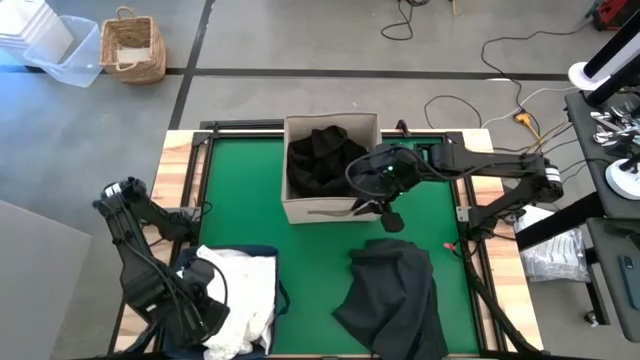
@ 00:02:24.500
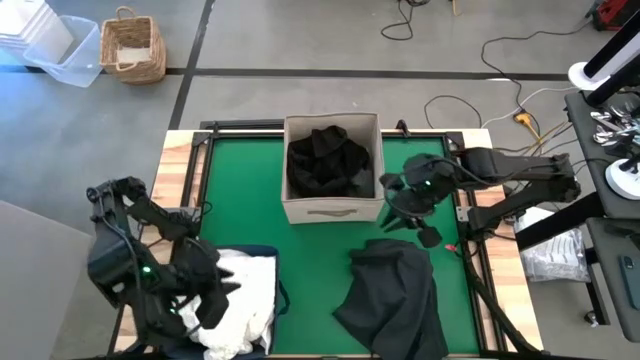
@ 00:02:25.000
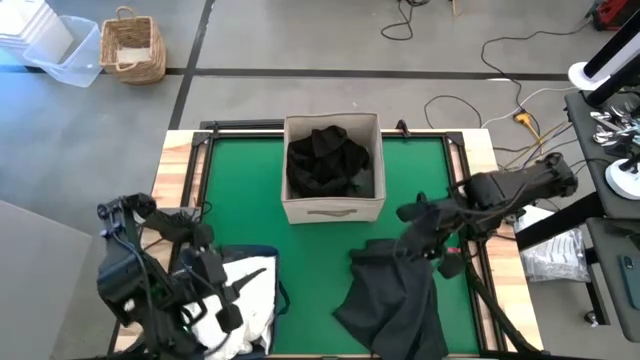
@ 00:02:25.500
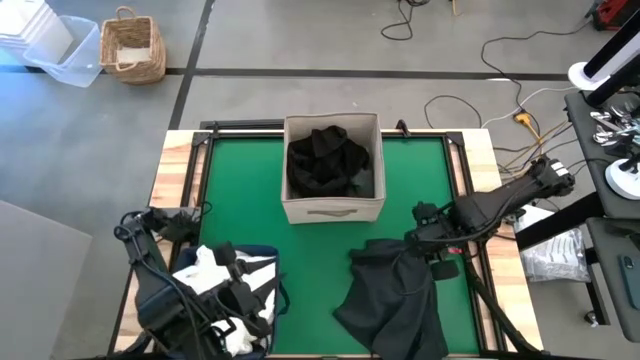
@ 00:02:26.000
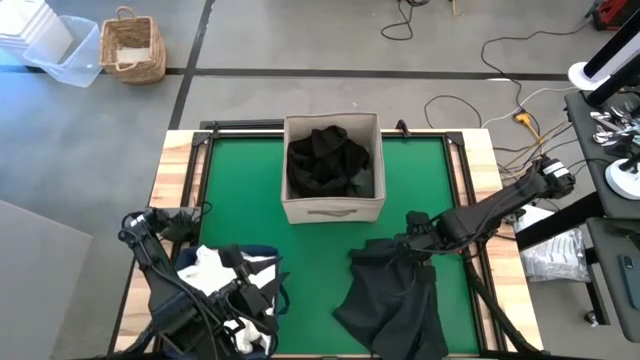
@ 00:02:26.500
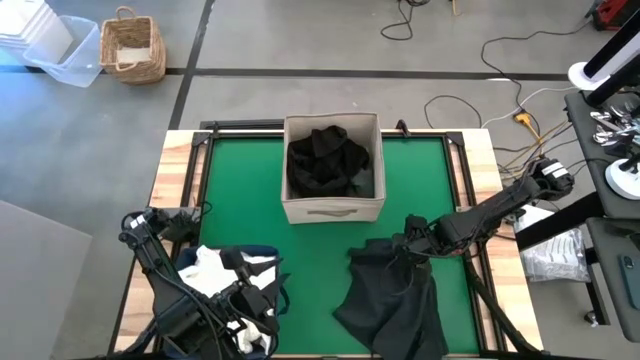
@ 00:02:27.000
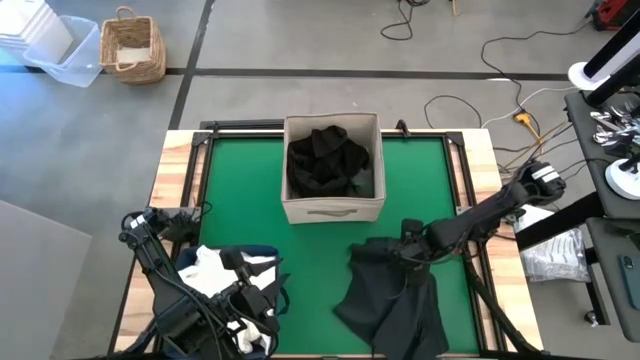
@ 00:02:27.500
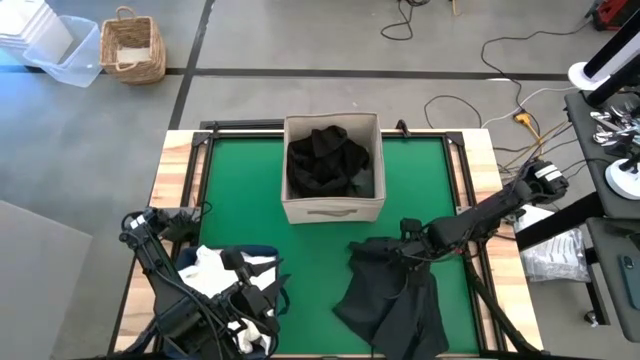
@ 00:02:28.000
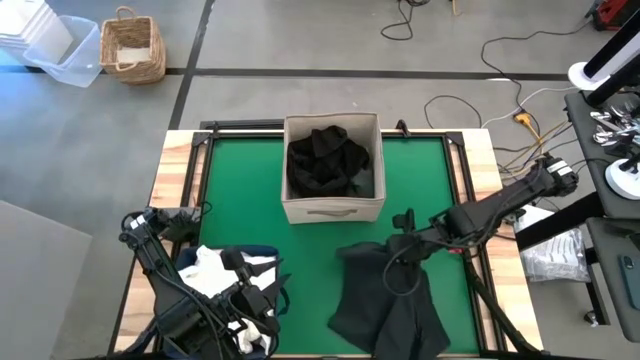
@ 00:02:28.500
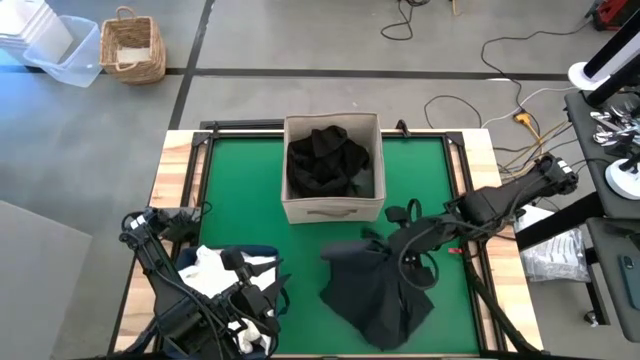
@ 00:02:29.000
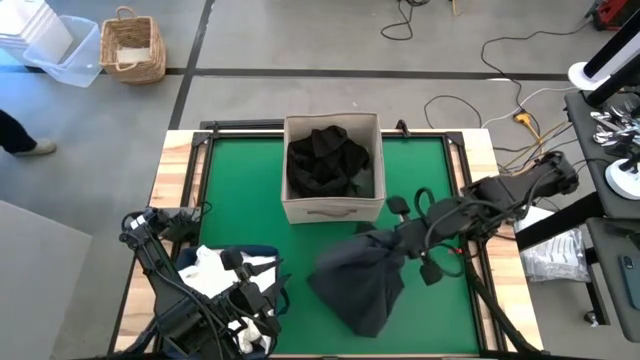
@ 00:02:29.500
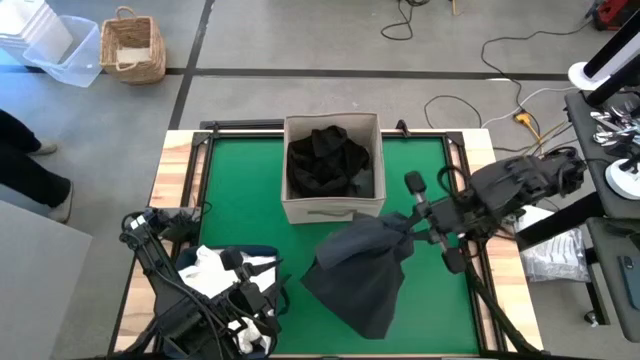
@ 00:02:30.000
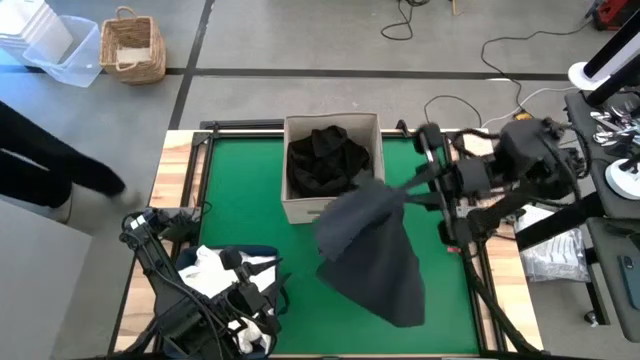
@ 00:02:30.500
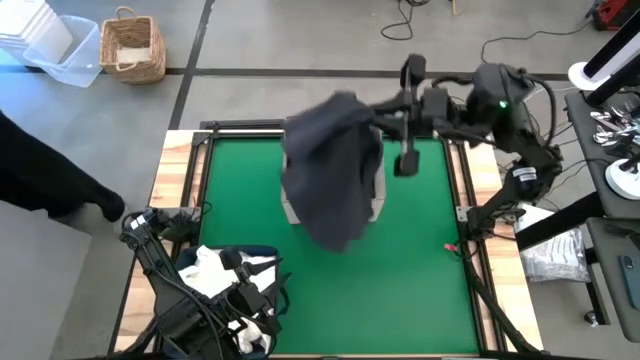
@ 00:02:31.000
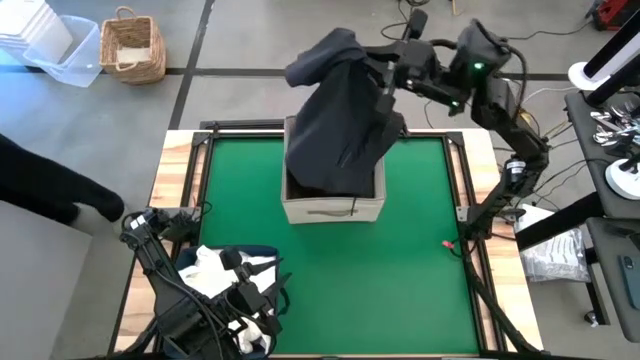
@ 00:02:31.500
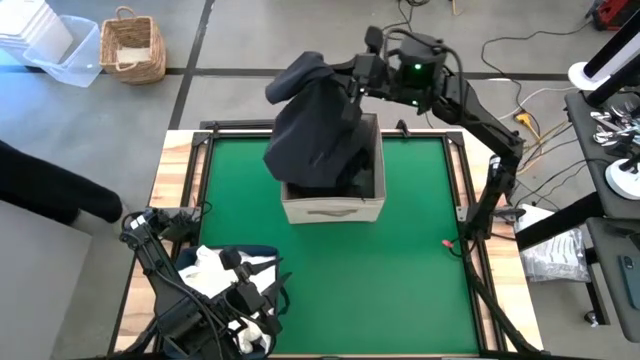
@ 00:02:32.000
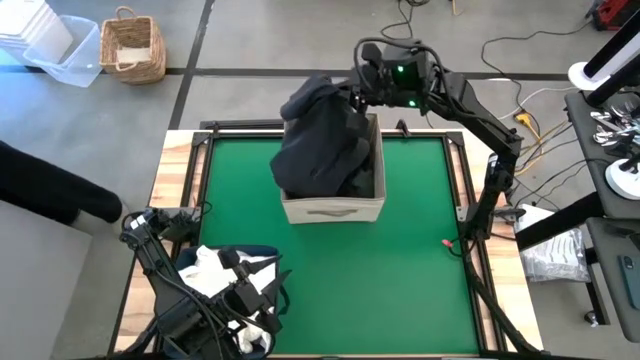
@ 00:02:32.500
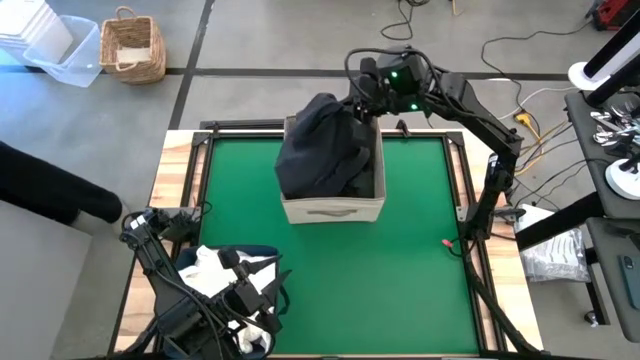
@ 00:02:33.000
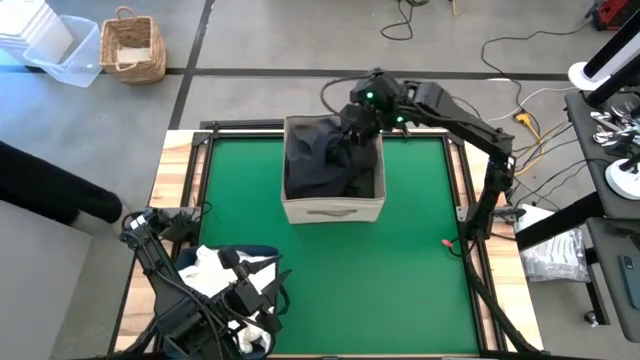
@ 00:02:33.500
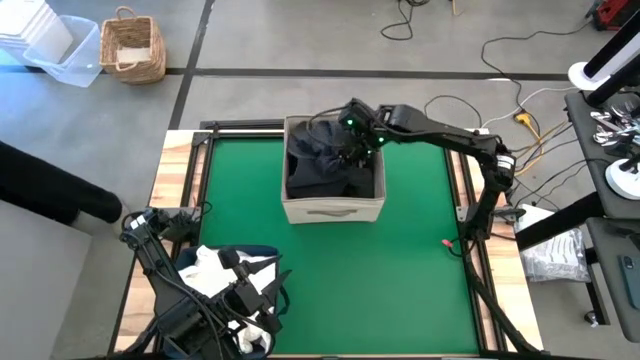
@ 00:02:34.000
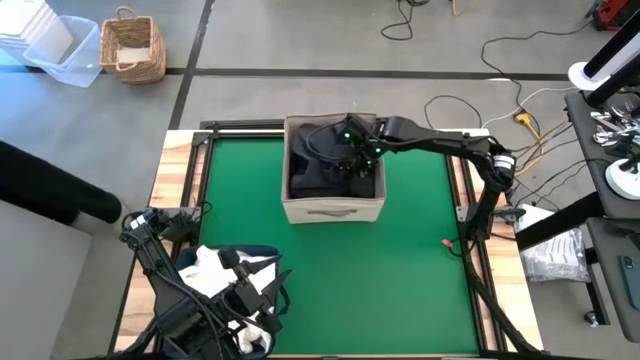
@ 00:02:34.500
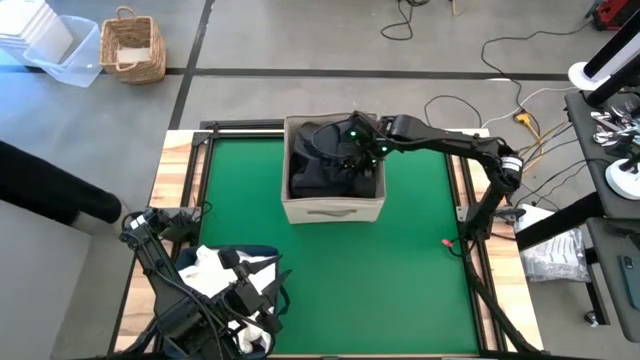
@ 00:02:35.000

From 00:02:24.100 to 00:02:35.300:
Put the black short into the brown laundry bin

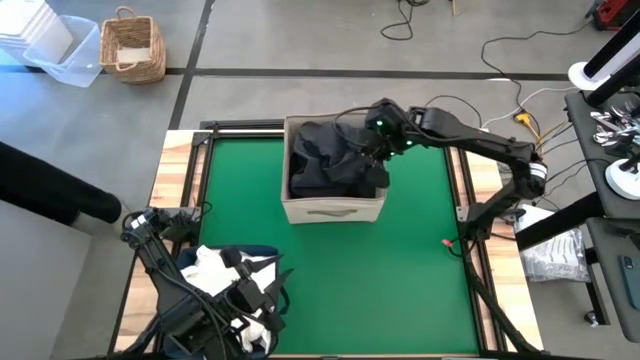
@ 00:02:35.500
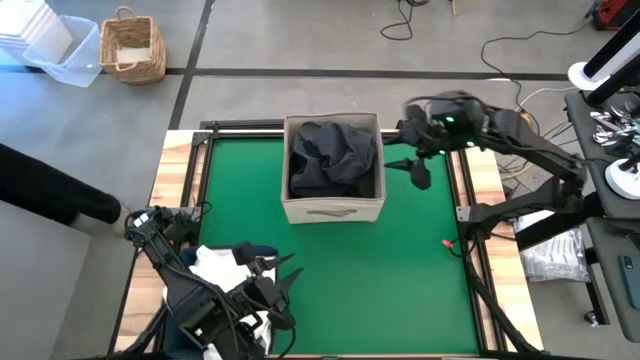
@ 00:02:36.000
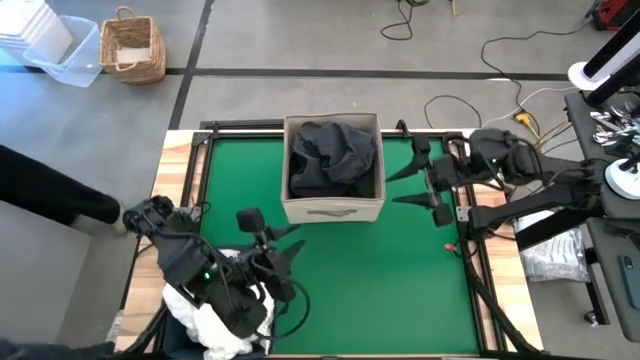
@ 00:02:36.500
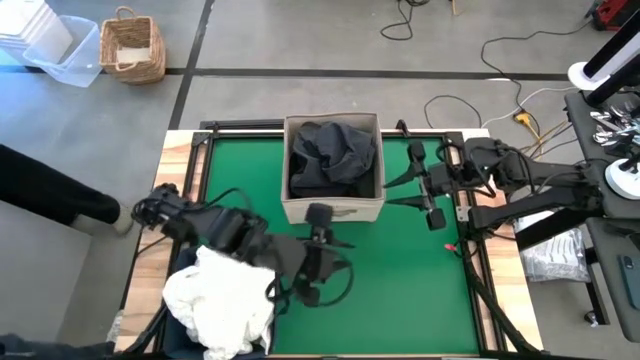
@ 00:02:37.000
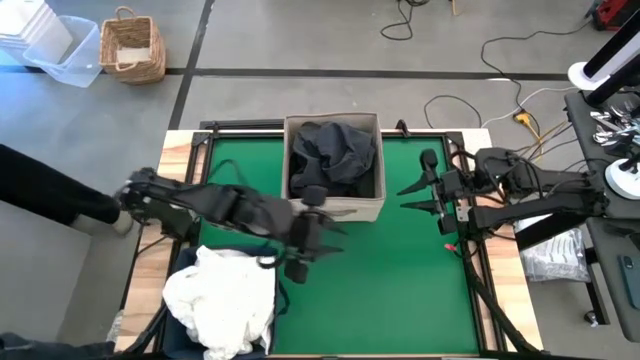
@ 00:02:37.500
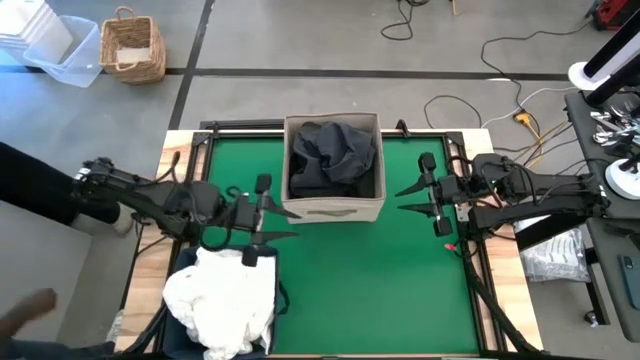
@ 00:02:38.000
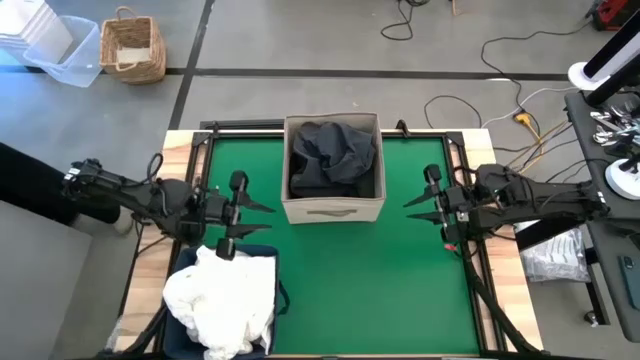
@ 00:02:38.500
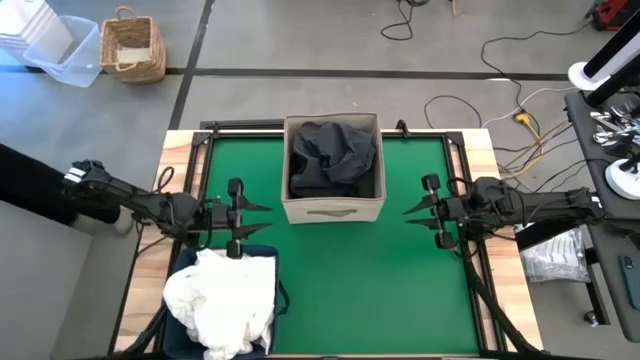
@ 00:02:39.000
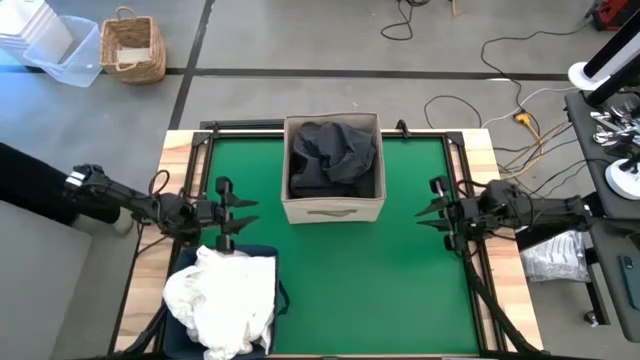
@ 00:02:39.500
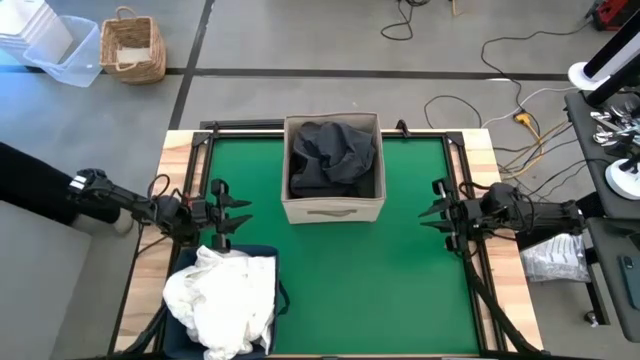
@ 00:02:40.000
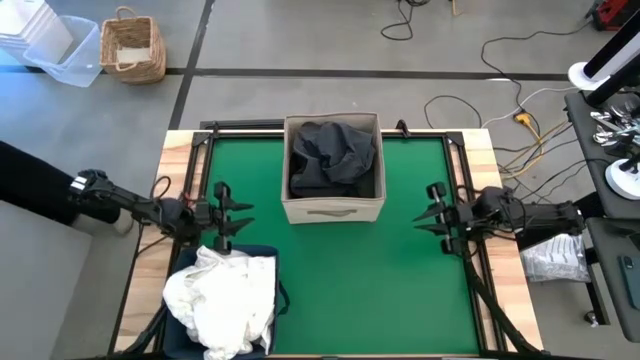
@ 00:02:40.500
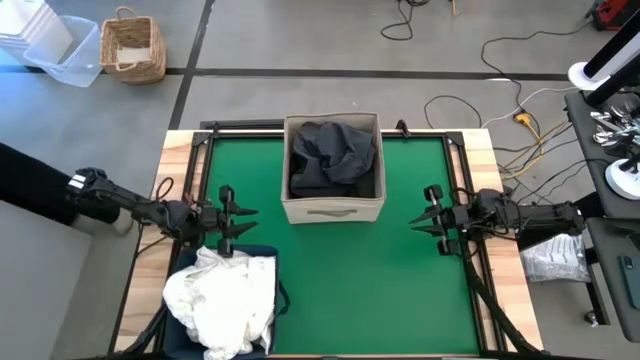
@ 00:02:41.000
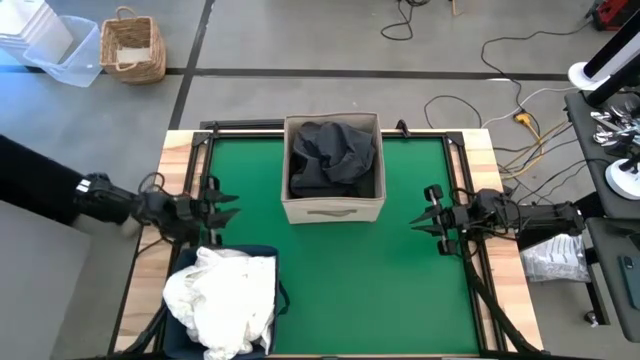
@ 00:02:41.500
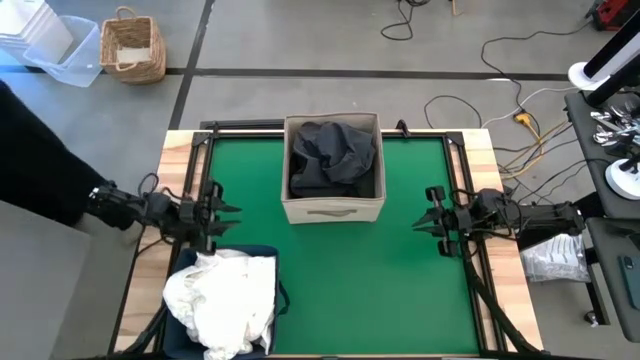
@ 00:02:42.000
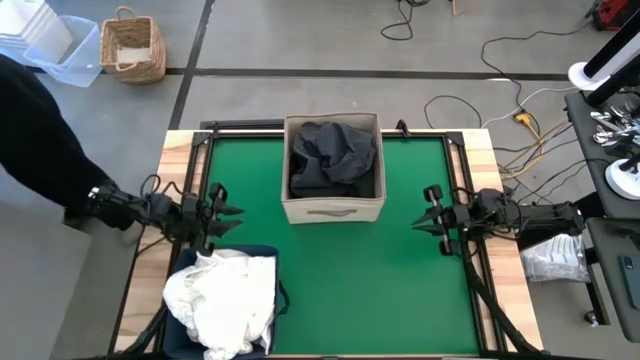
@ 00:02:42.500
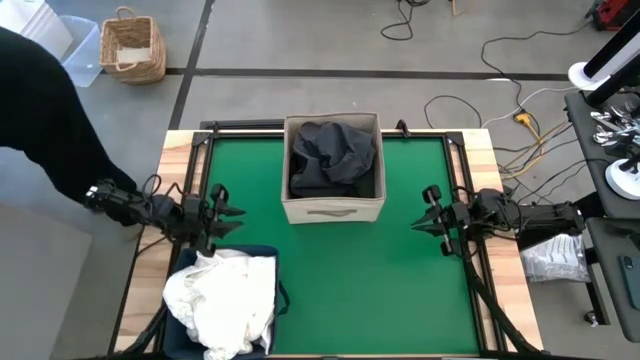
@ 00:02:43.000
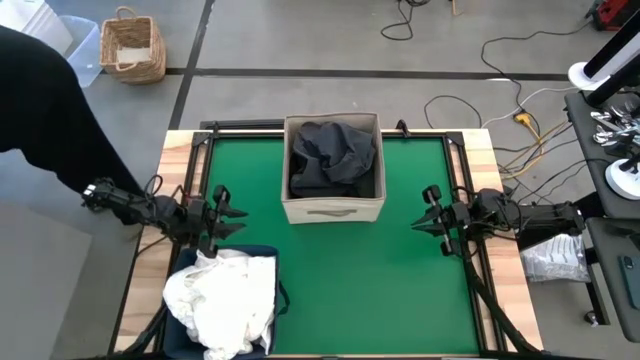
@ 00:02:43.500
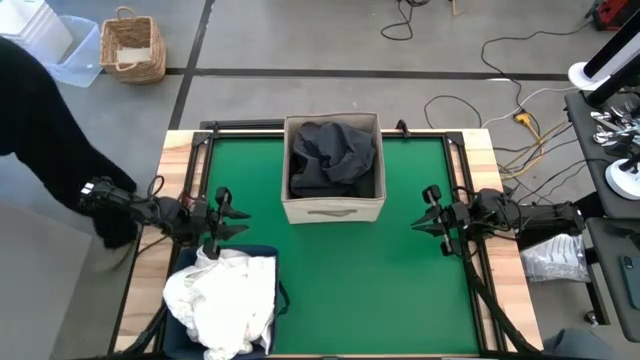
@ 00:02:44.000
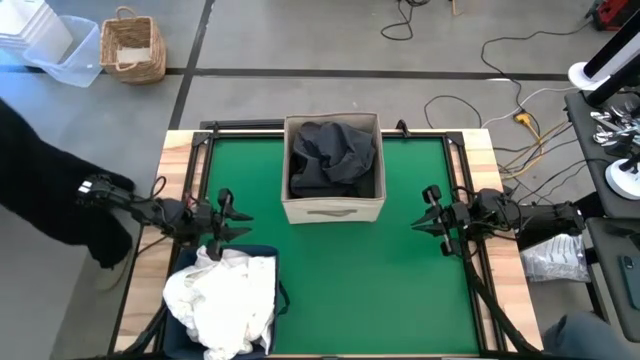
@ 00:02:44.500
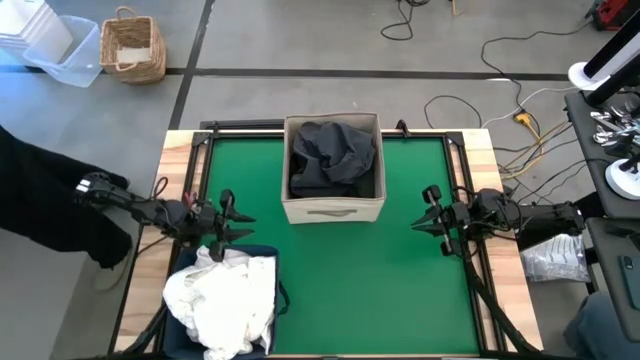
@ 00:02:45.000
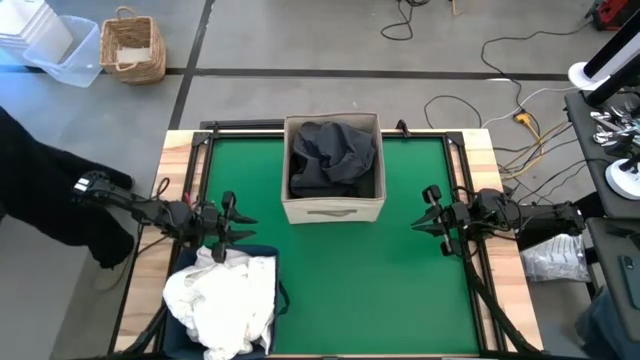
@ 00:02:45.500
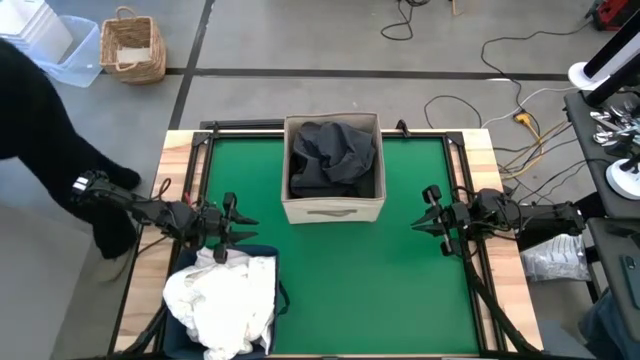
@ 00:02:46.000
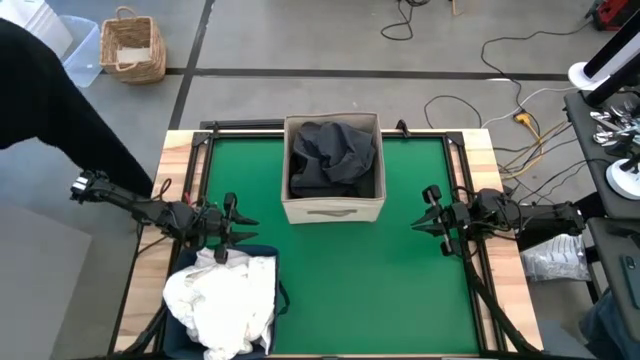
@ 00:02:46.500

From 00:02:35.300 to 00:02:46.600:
Return to Home Position
